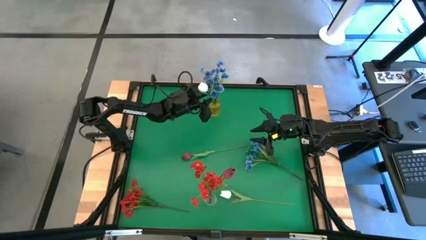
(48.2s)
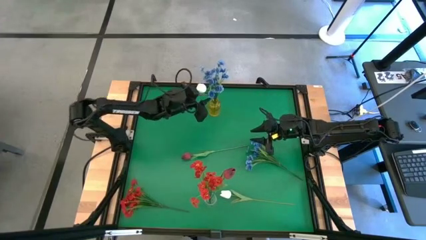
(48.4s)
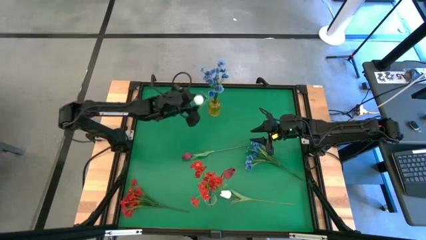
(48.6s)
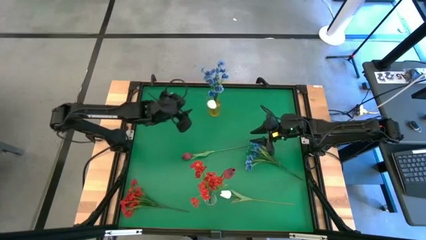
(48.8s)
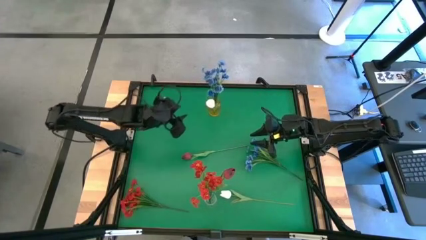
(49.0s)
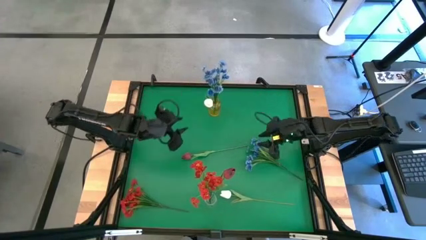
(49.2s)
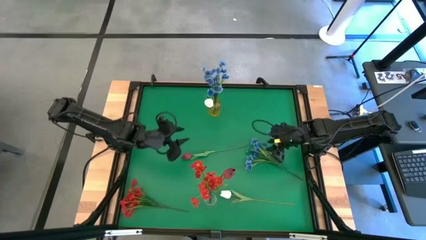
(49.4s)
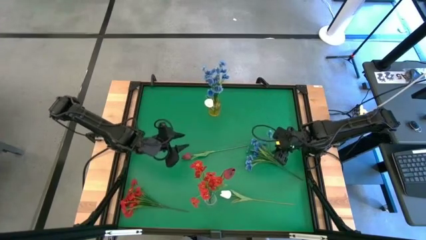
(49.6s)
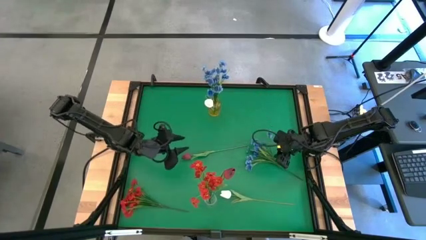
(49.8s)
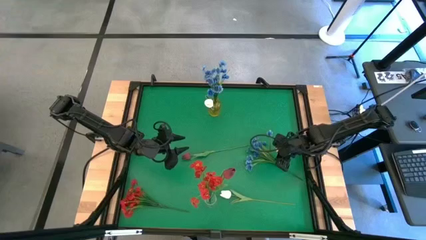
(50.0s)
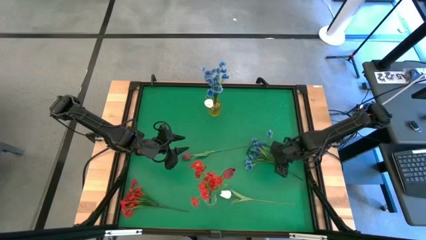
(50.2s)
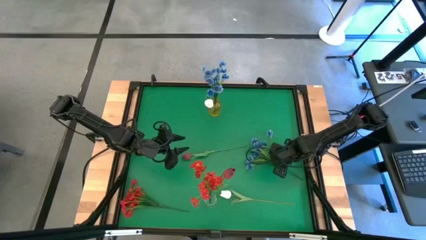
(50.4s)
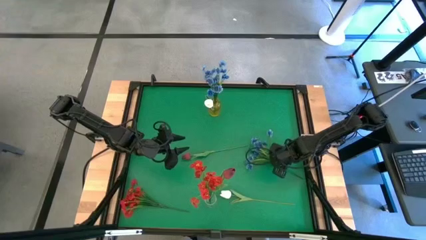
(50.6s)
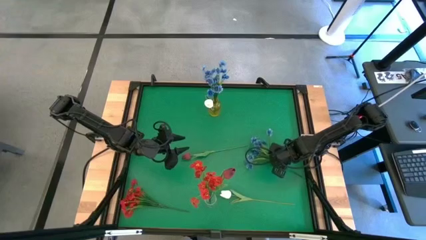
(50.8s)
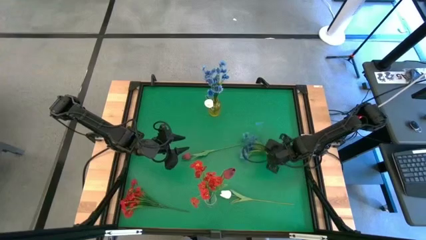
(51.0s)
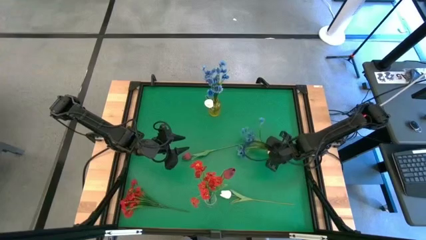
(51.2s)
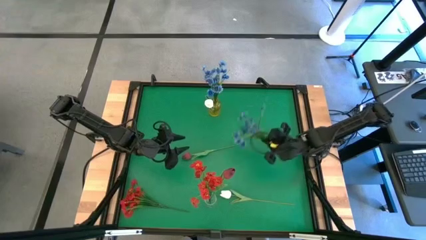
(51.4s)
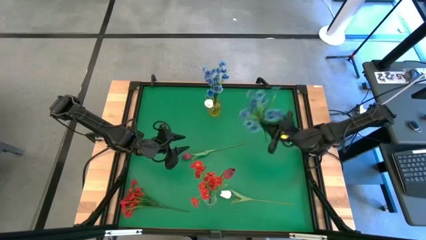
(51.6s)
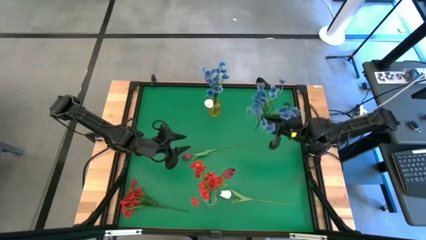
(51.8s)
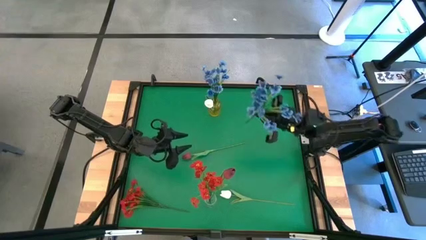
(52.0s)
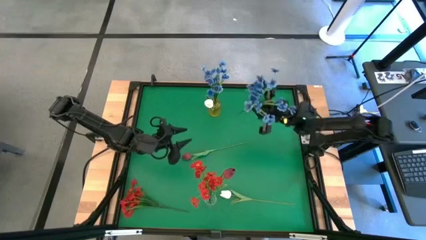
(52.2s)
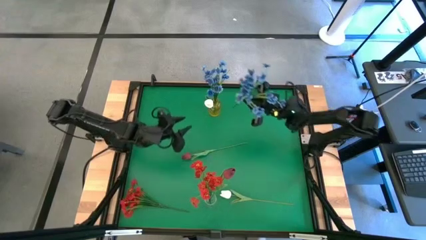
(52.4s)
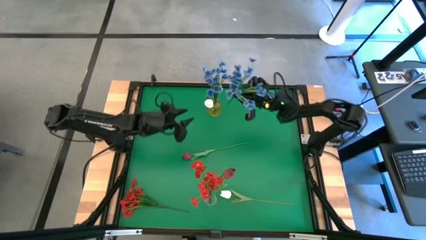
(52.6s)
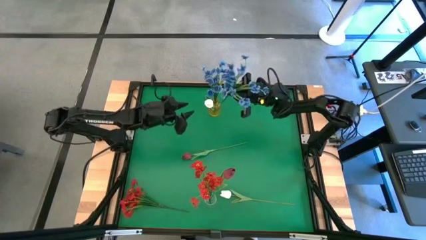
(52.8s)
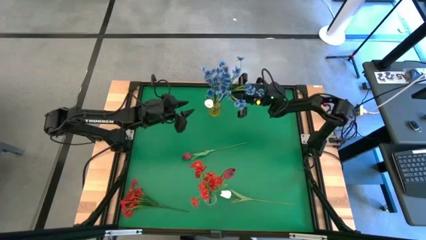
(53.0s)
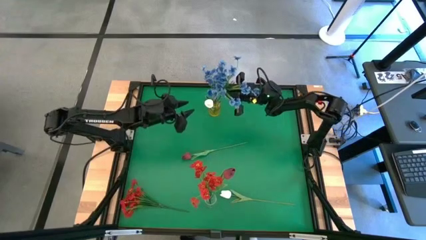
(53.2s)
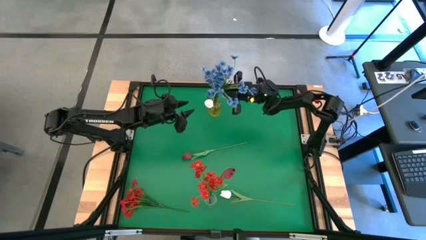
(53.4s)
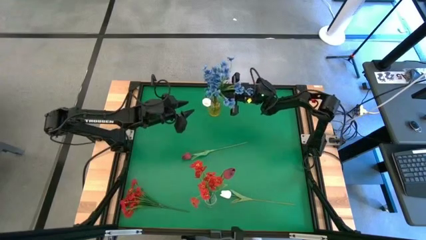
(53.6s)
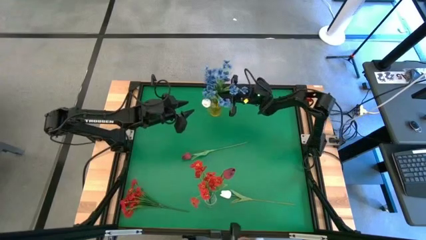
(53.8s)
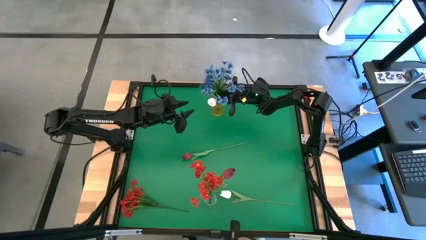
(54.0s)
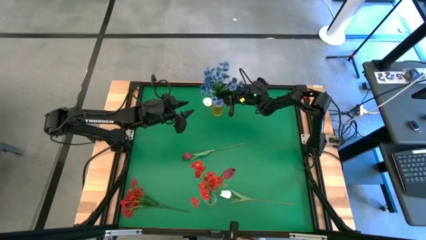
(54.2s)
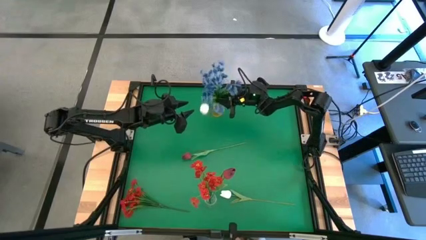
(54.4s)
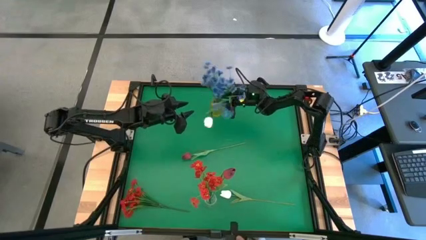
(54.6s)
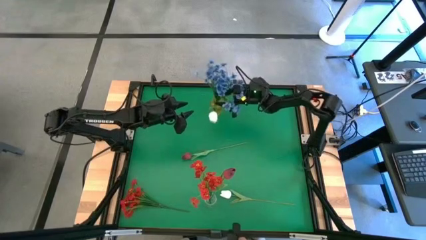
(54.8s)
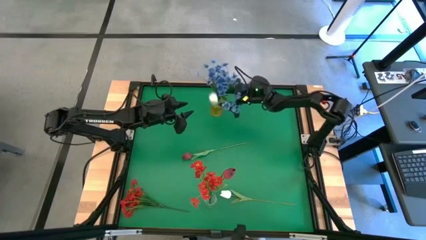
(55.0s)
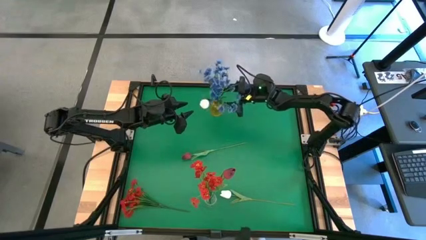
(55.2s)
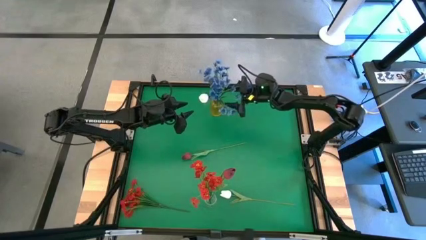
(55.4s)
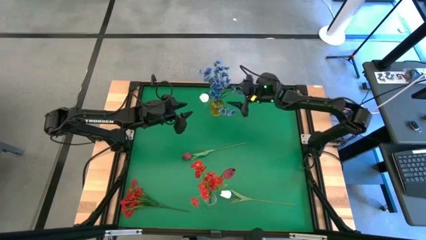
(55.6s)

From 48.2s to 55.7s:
Task: Sort flowers into vase by color
Put the blue flowers into the yellow vase

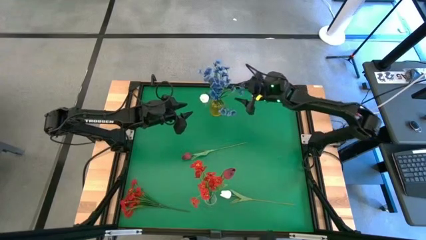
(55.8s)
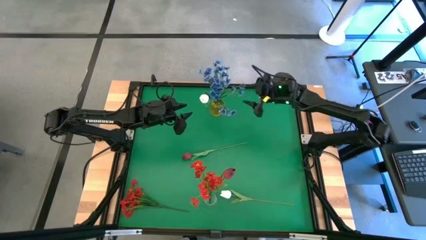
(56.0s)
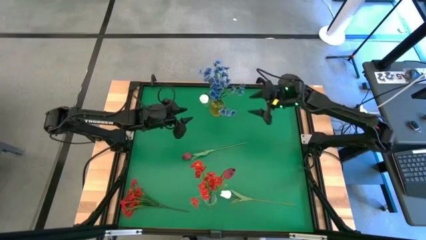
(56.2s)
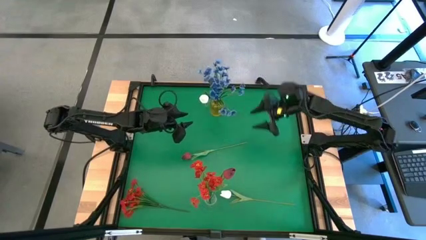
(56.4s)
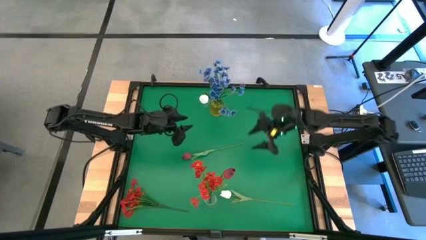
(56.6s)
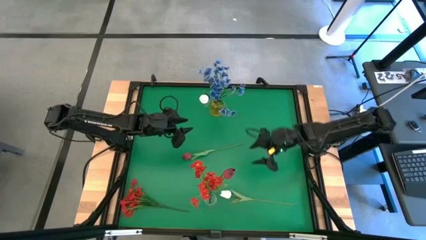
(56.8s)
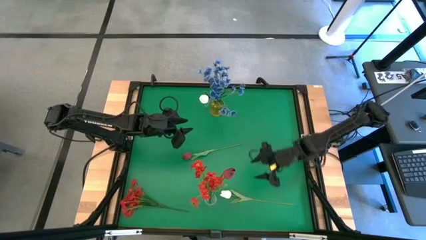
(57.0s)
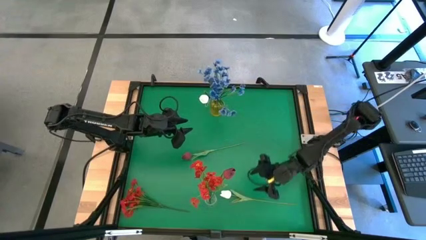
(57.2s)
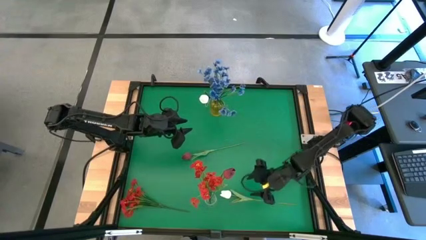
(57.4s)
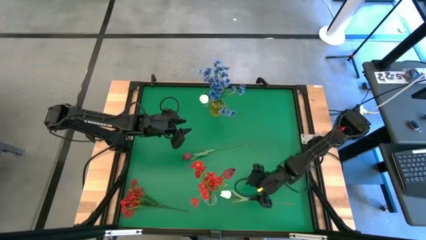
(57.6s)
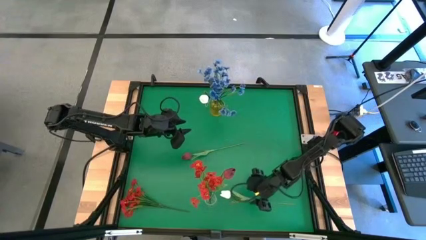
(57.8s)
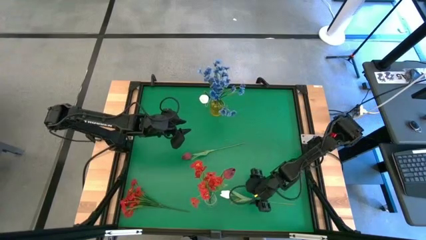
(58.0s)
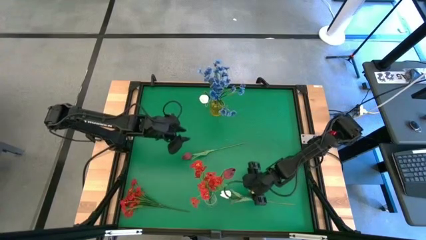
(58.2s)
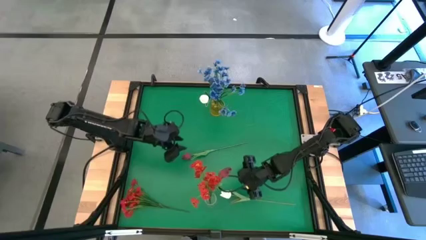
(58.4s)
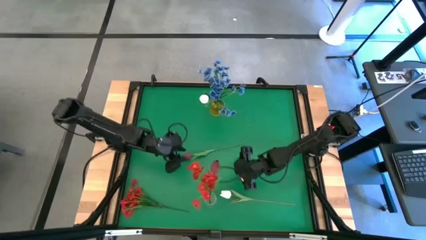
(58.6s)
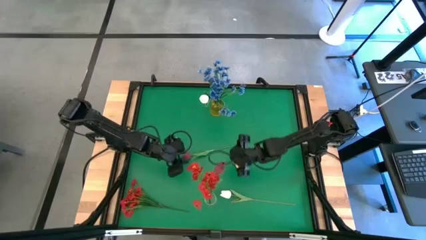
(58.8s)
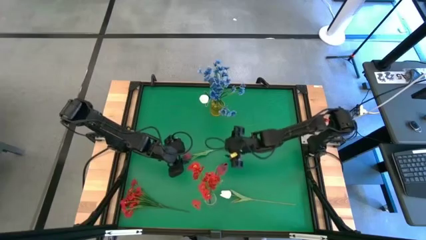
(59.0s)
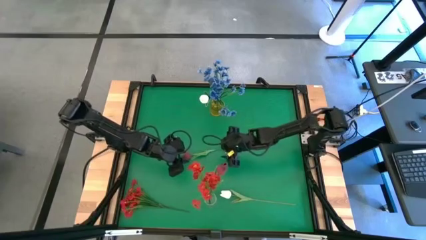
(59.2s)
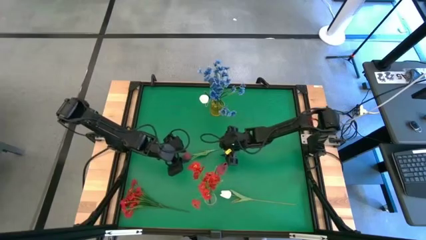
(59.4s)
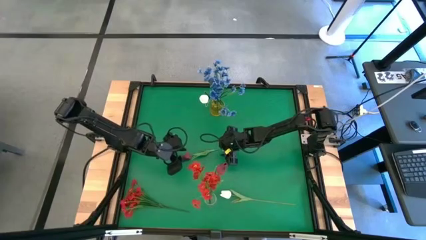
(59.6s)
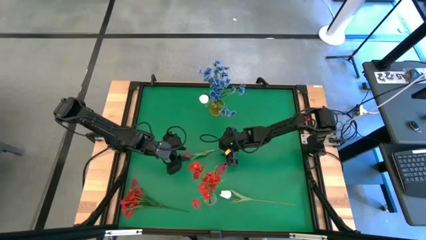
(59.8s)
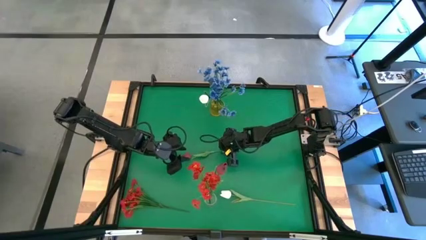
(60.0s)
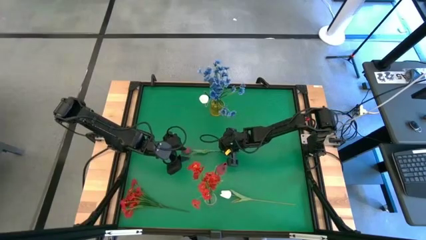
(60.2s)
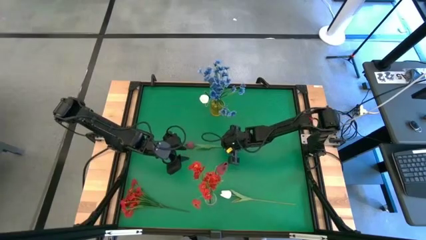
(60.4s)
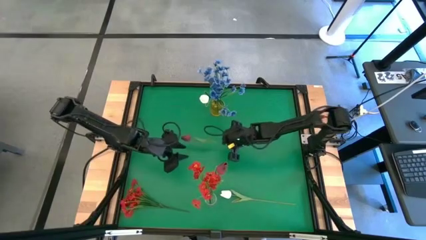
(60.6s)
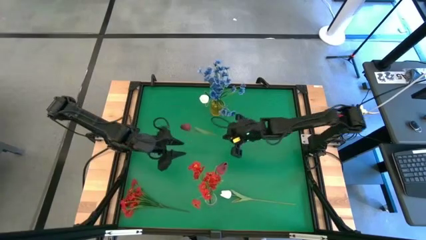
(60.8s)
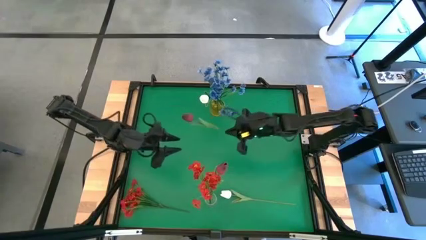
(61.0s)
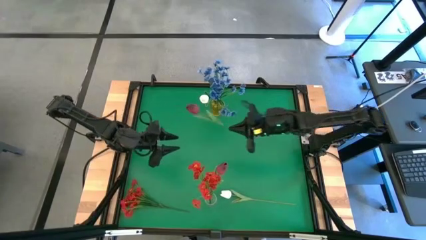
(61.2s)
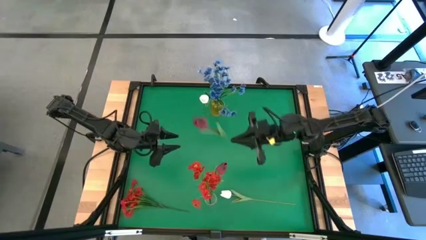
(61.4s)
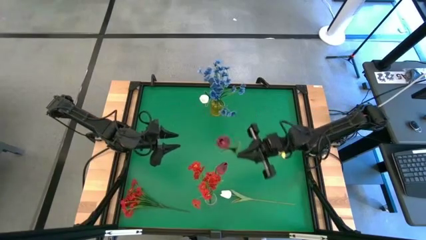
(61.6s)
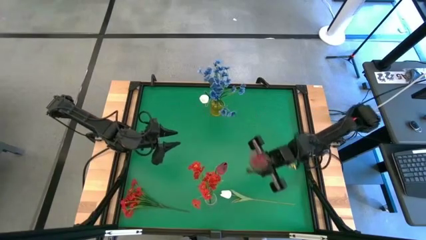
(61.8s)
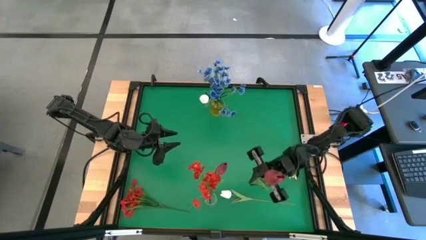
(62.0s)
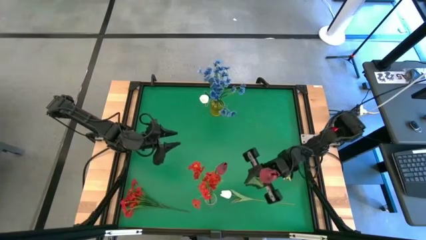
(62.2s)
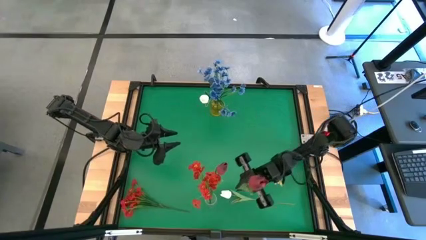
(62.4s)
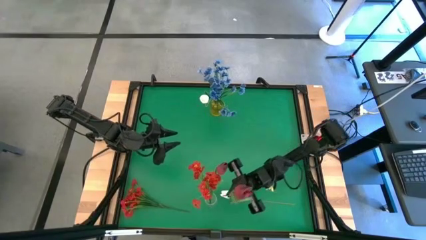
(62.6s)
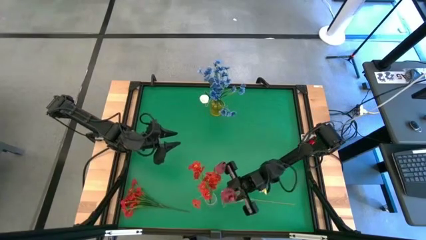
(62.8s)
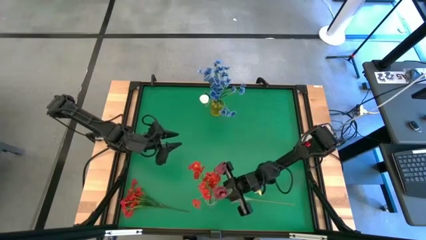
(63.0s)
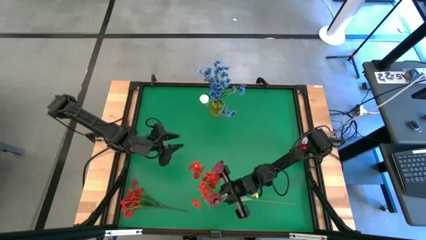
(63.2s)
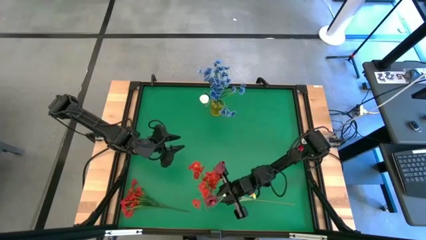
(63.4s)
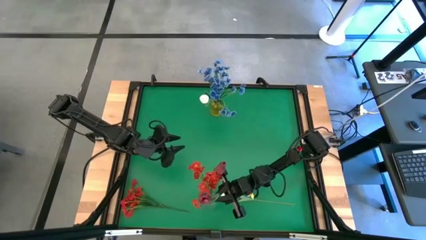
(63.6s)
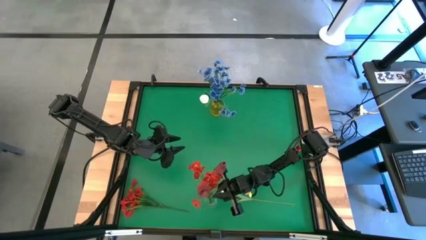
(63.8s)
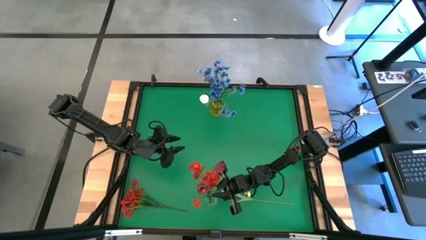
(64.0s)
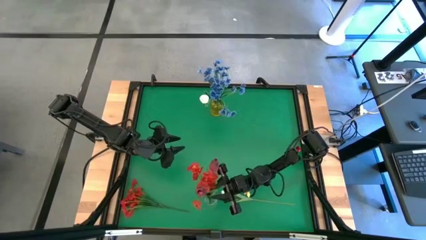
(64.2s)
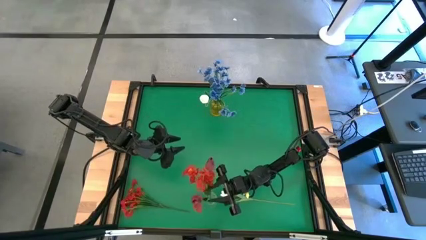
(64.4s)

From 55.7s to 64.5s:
Put the red flower into the transparent vase
